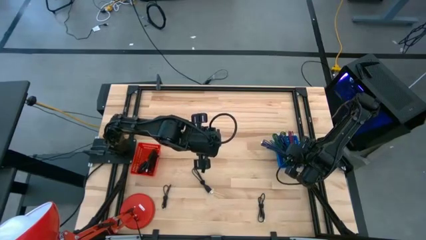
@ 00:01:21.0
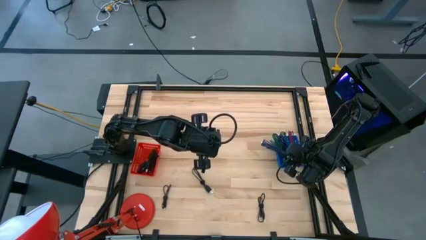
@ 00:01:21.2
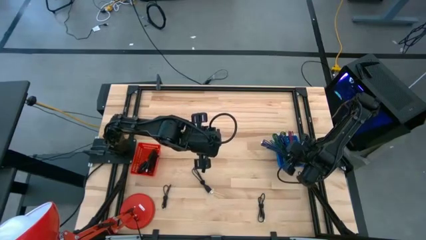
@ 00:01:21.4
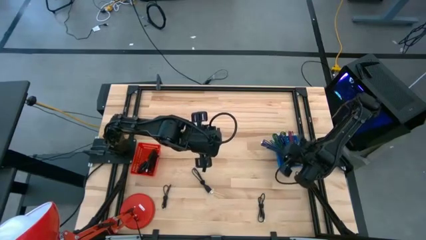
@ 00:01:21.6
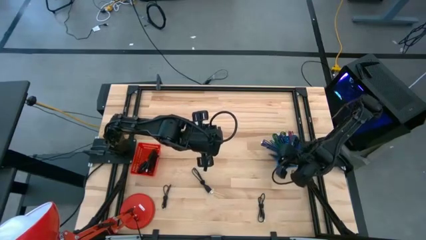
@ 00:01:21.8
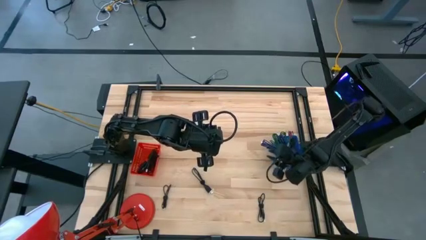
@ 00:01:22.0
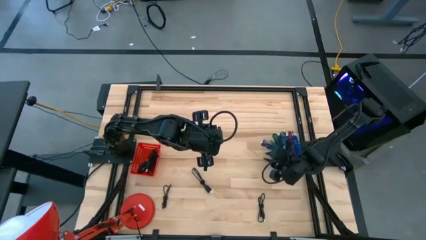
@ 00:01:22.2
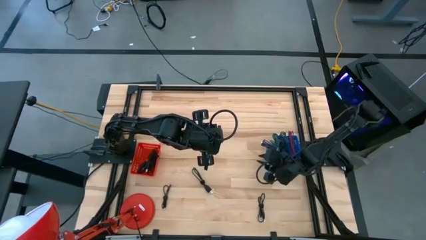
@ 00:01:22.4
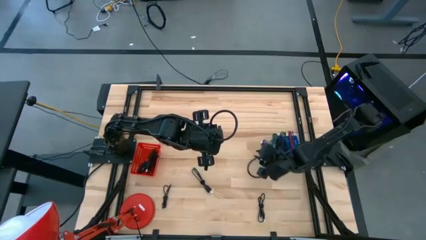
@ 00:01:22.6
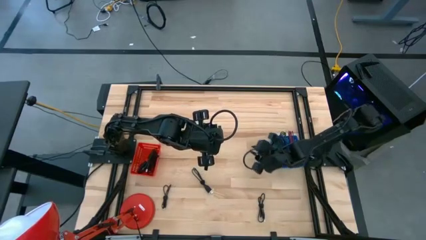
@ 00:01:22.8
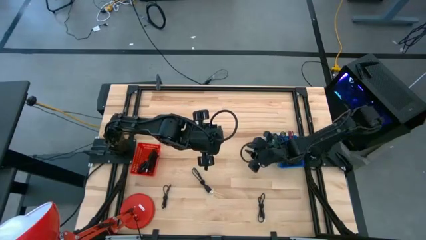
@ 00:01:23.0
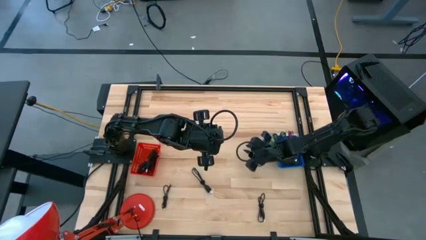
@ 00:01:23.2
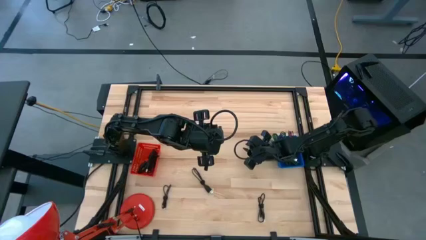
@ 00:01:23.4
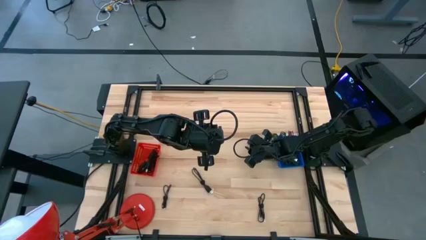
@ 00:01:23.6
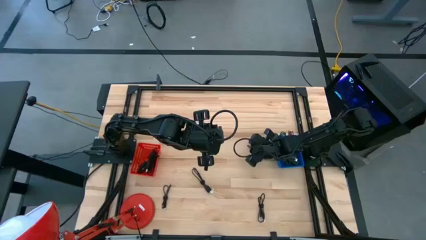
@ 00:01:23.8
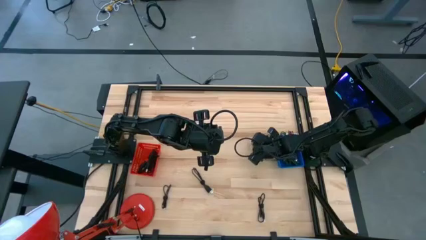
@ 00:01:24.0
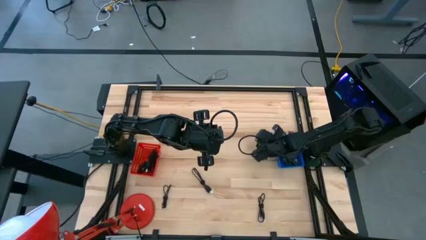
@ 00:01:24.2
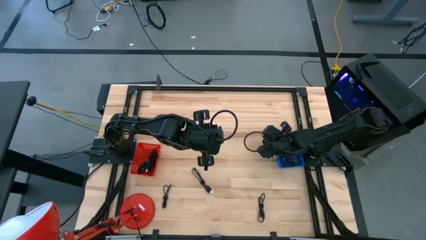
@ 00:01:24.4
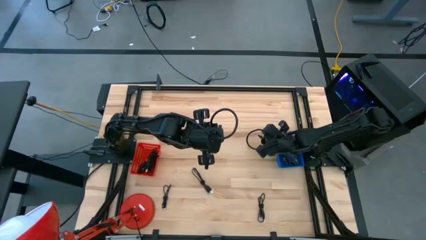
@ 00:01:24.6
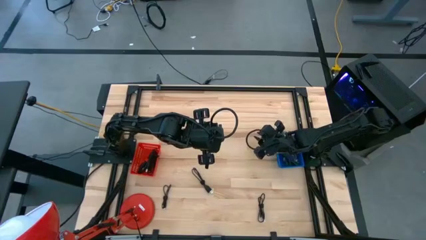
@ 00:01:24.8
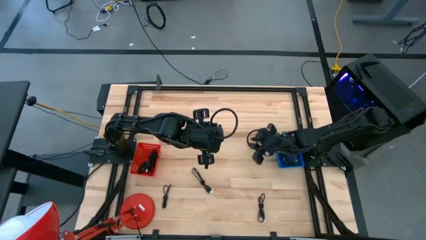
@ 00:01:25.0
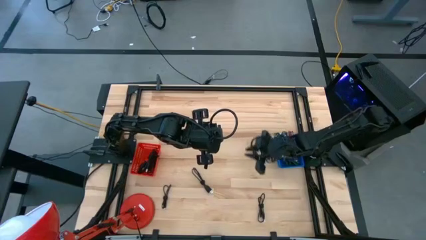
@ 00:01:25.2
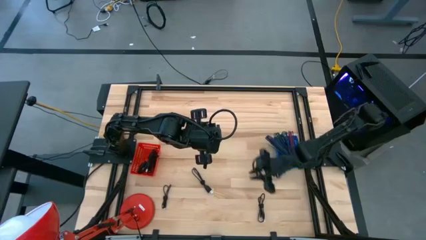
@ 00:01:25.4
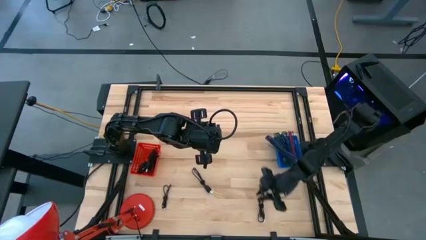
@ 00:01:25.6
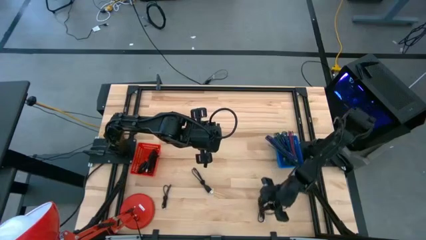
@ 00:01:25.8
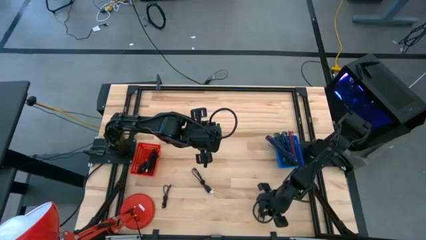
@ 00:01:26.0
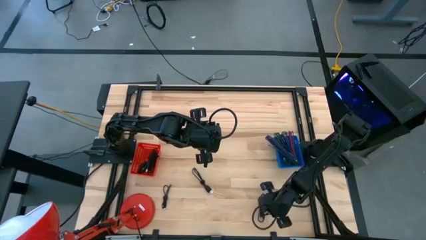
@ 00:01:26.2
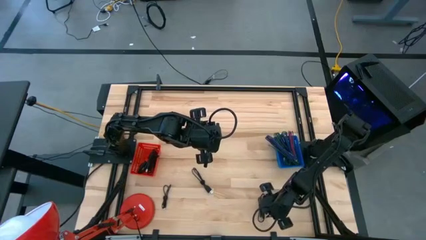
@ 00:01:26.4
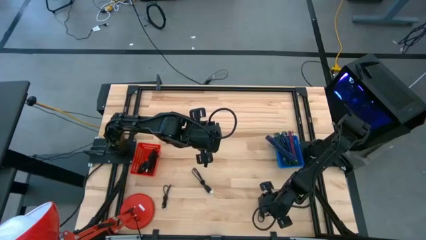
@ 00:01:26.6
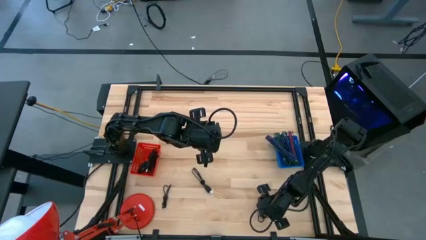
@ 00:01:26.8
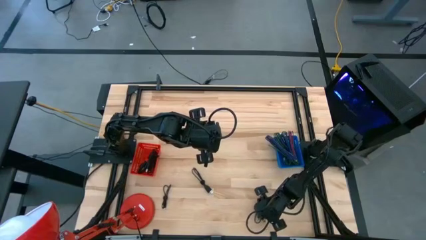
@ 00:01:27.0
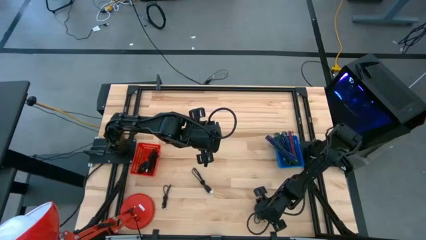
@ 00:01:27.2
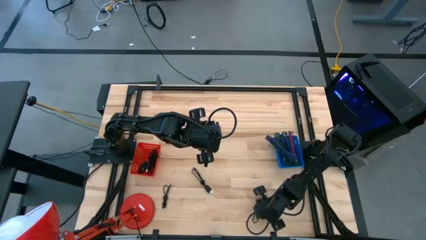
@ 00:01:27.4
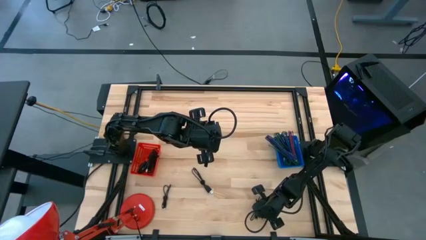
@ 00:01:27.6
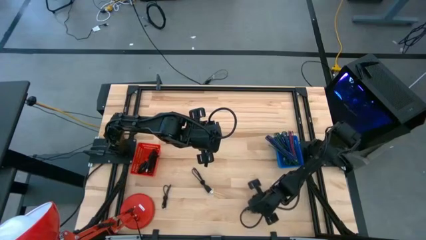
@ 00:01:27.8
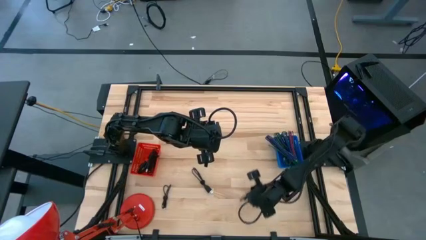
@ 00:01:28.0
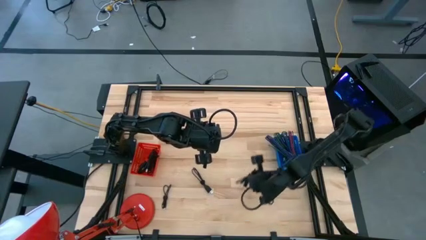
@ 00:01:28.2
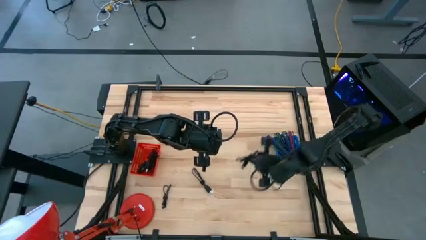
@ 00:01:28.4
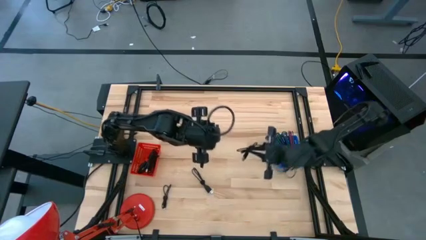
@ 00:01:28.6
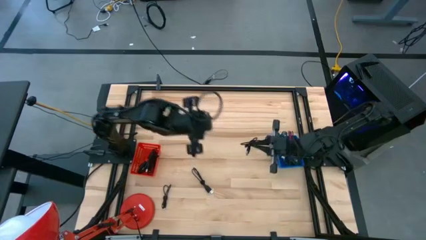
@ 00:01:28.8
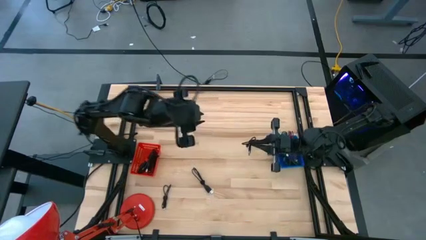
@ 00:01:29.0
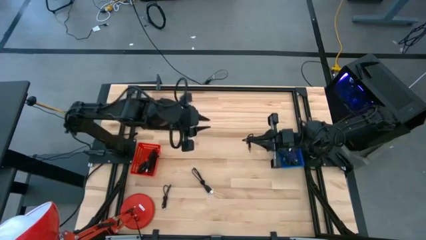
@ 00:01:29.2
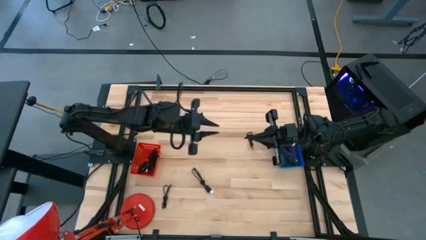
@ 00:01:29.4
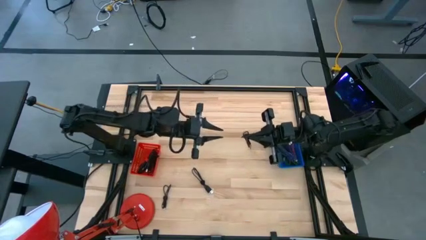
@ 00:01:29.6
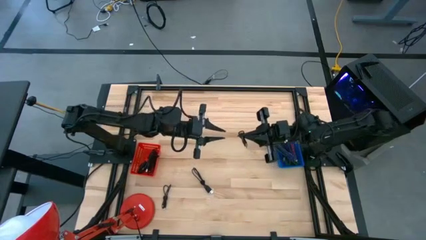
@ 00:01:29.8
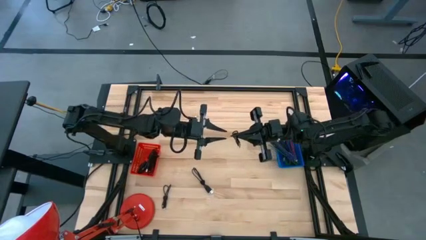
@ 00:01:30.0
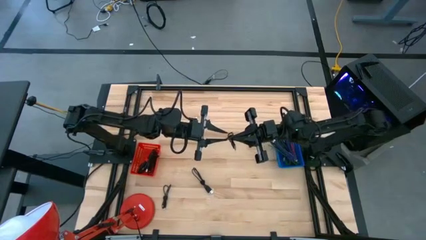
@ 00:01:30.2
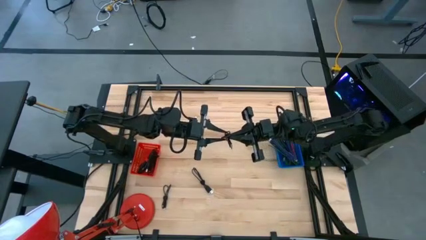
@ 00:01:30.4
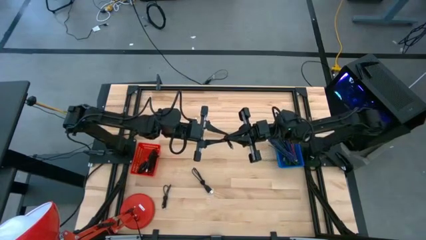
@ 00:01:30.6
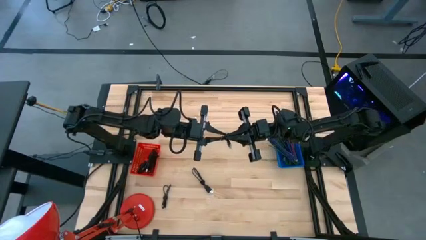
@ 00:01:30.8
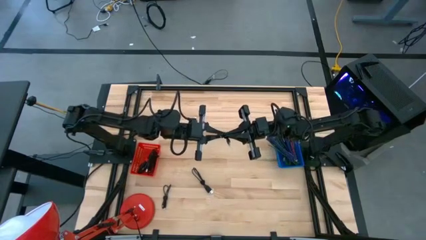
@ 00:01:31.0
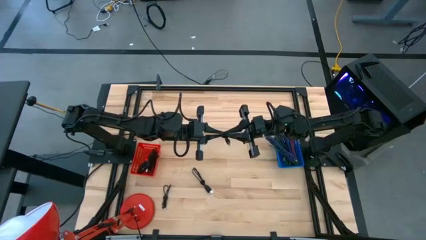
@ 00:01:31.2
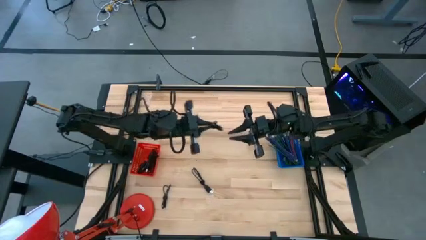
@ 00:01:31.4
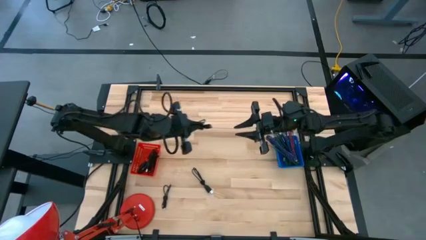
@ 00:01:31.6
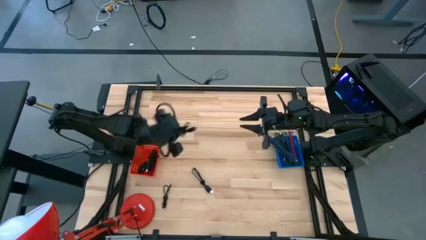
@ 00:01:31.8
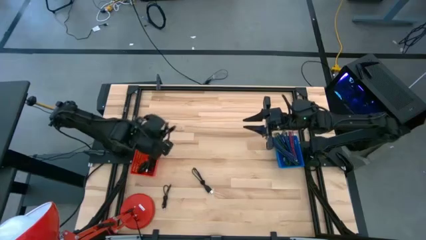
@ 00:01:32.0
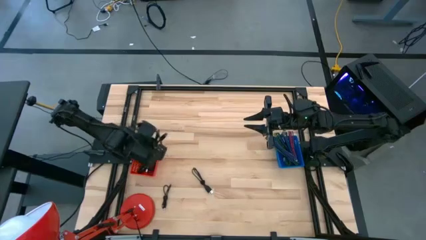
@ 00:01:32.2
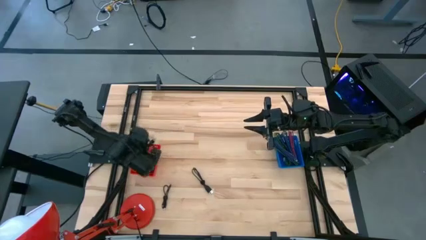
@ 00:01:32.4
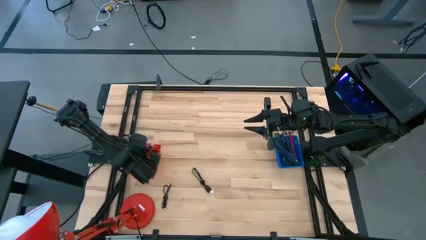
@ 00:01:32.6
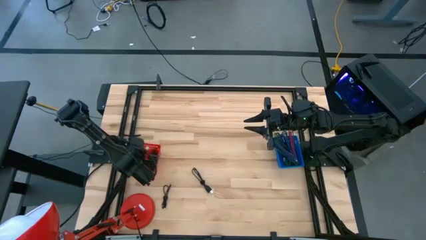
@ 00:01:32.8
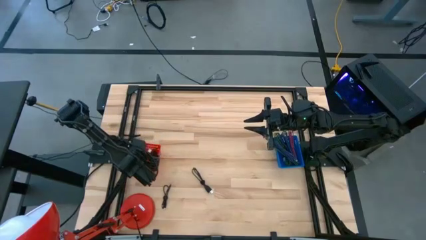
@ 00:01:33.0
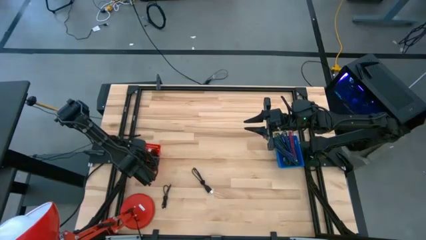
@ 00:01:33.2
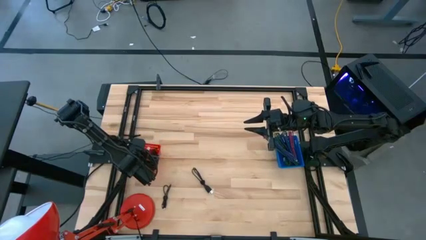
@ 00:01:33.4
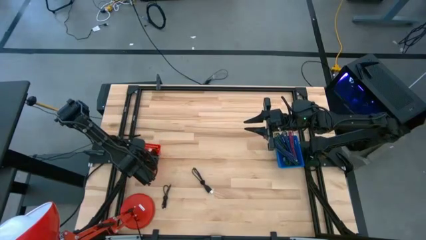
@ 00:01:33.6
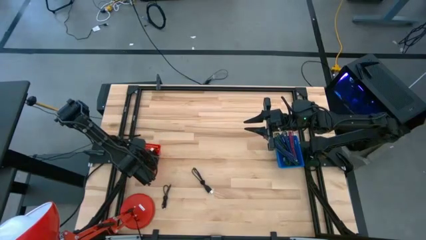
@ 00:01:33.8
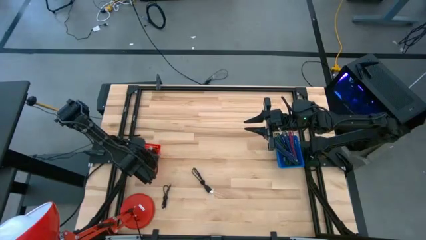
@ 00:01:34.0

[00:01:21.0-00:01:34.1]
Task: Pick & Place USB Port
Put the black charger cable into the red bin

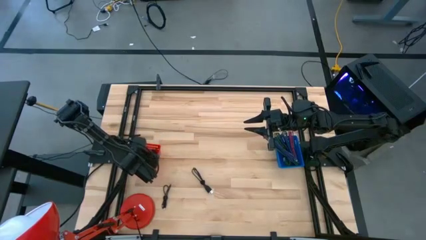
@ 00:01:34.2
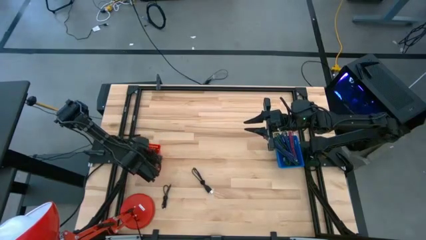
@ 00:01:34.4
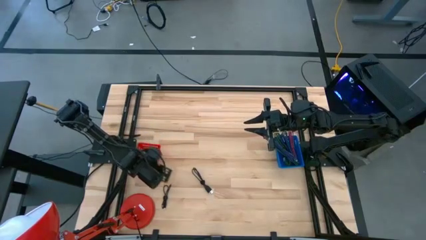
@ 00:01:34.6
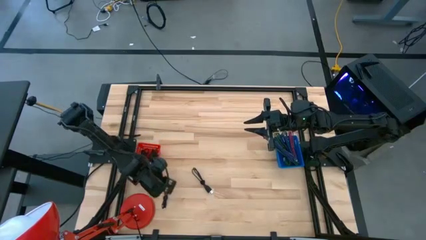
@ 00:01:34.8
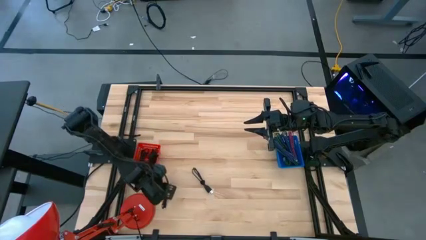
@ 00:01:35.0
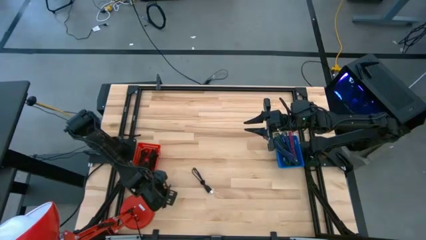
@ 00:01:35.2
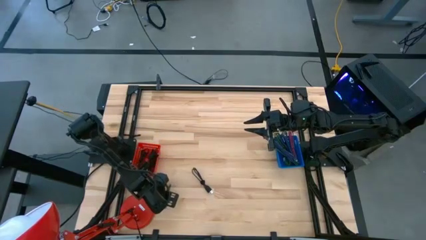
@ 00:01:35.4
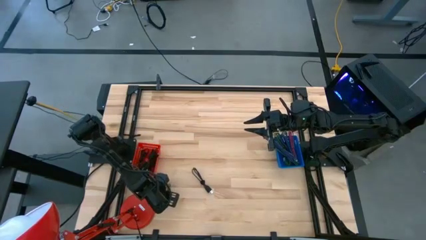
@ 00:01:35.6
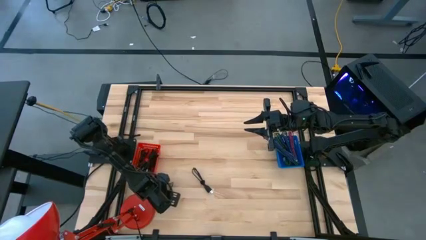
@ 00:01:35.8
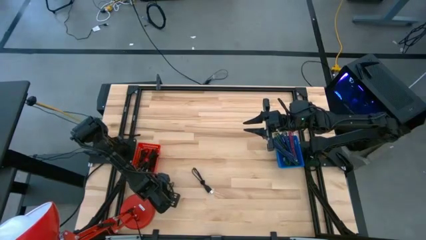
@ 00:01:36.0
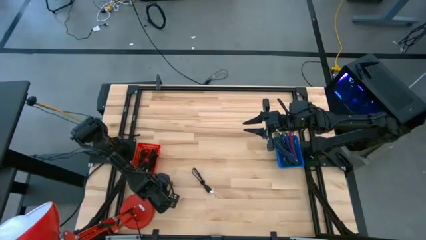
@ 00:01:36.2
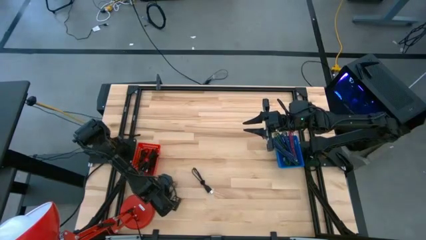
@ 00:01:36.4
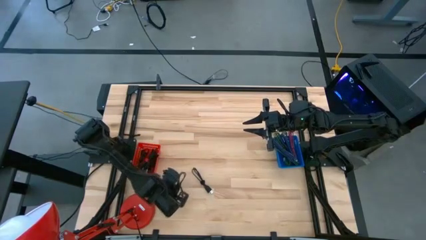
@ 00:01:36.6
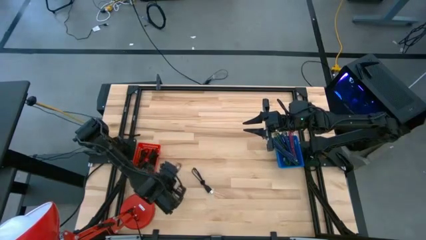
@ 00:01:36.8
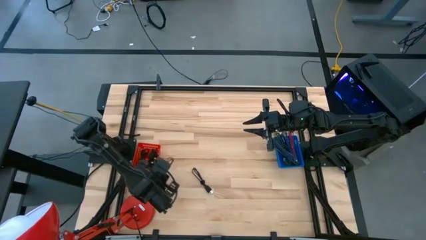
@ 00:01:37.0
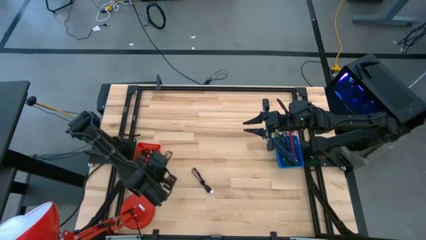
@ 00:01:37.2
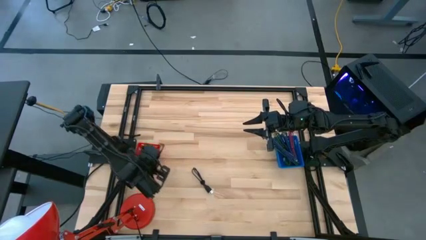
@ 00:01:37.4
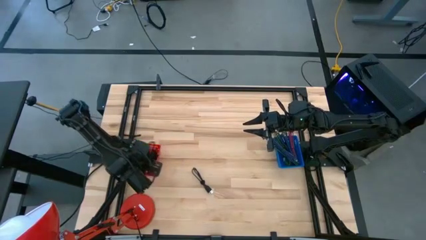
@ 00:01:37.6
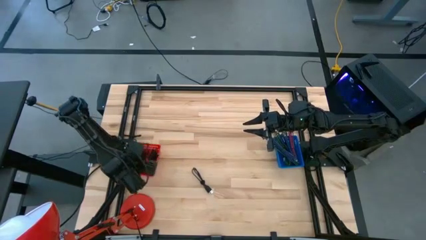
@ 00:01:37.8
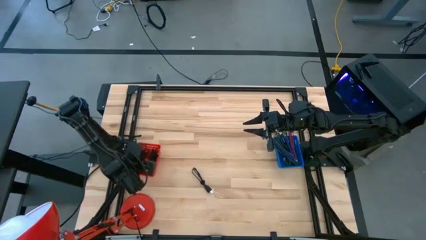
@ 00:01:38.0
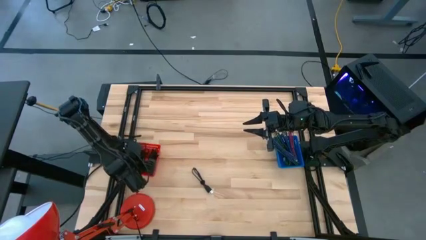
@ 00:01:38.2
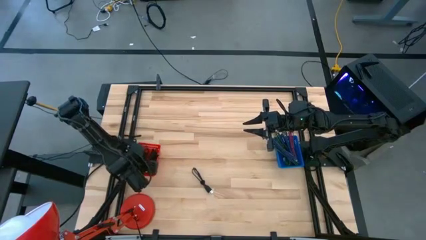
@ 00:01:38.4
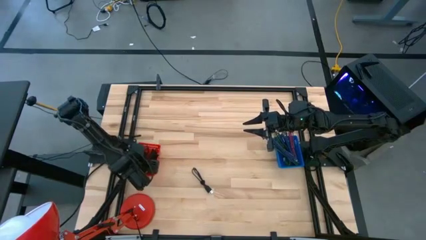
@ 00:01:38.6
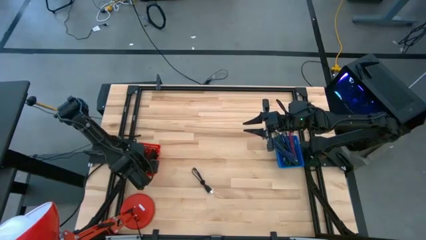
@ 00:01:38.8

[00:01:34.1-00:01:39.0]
Put the black charger cable into the red bin
